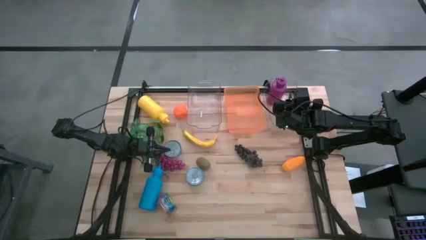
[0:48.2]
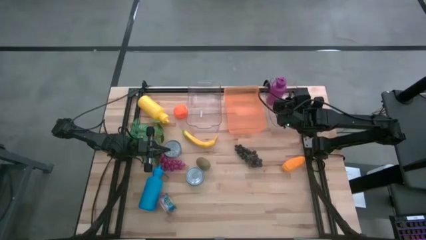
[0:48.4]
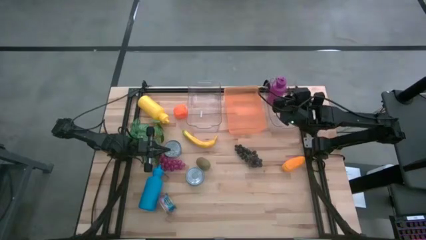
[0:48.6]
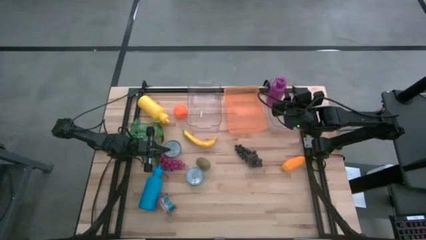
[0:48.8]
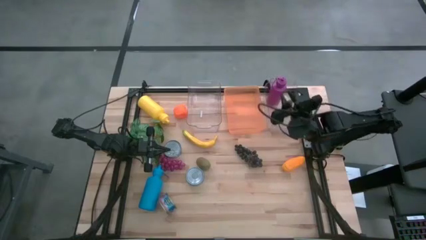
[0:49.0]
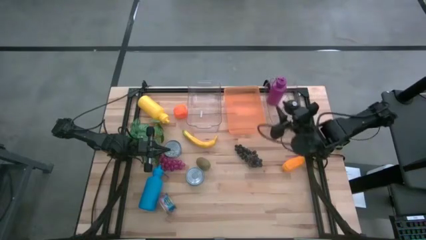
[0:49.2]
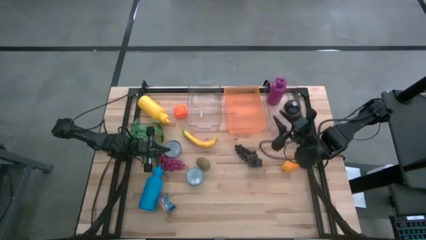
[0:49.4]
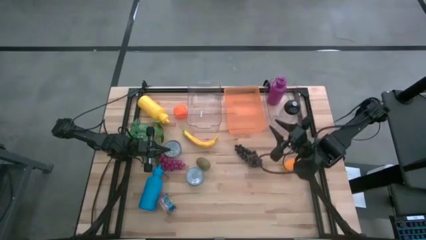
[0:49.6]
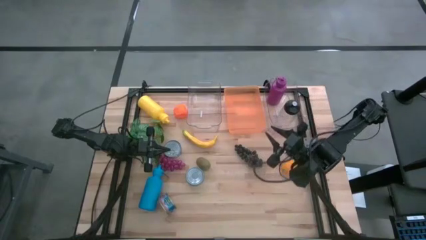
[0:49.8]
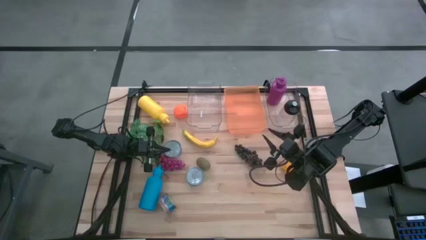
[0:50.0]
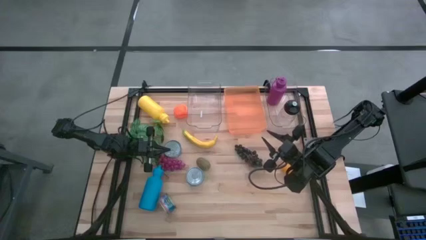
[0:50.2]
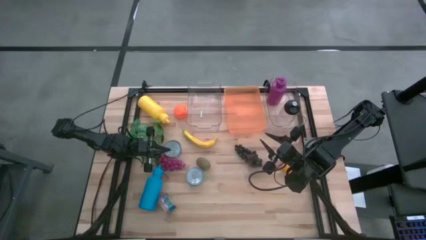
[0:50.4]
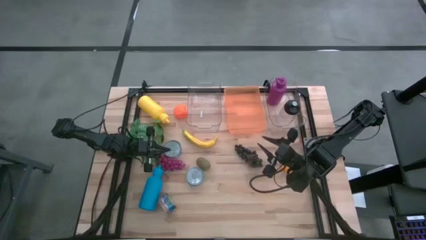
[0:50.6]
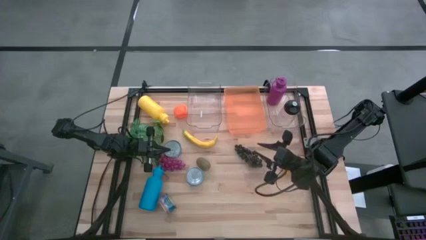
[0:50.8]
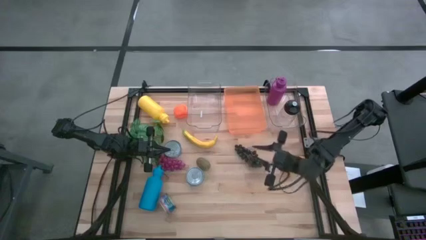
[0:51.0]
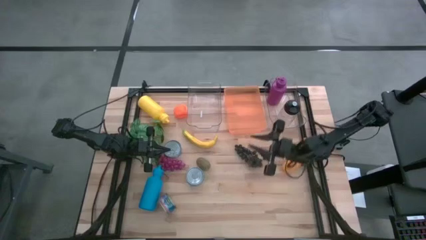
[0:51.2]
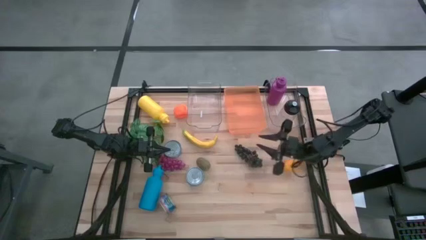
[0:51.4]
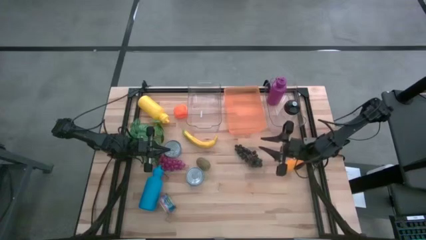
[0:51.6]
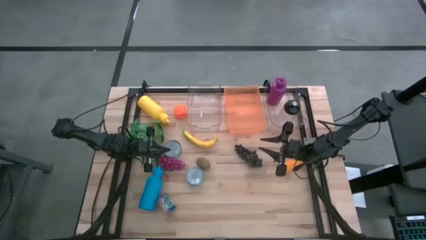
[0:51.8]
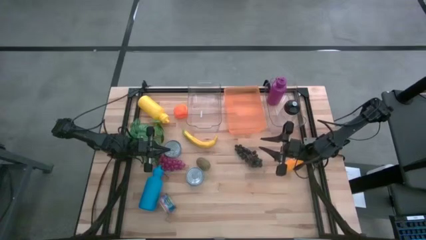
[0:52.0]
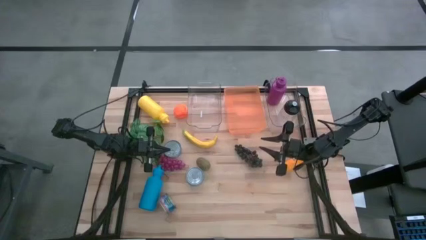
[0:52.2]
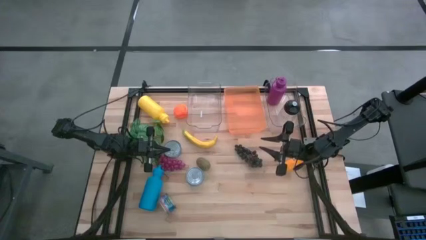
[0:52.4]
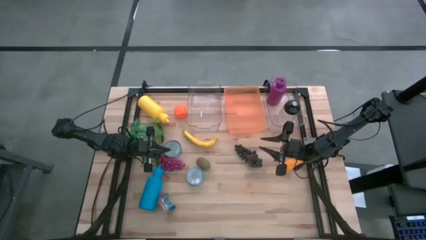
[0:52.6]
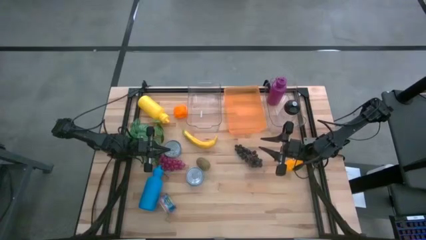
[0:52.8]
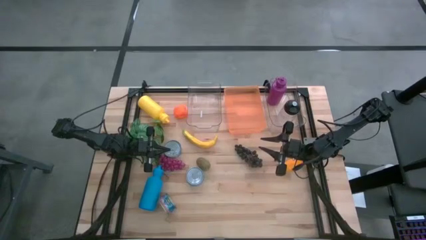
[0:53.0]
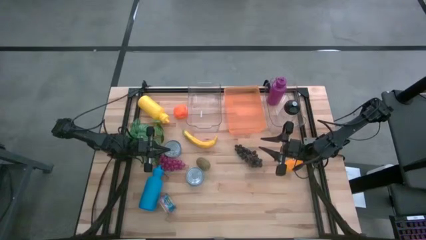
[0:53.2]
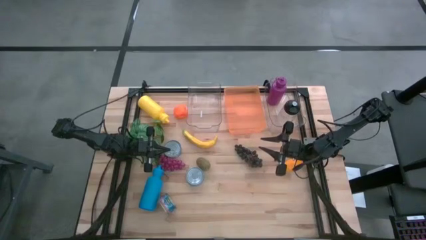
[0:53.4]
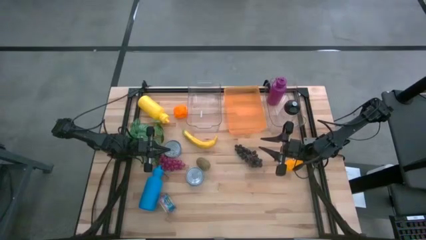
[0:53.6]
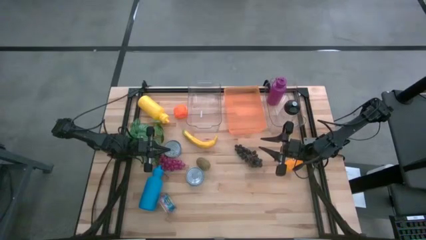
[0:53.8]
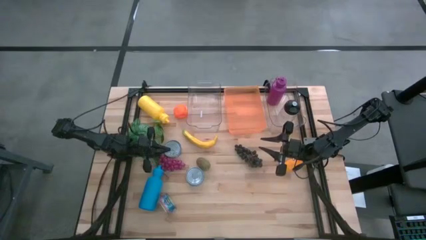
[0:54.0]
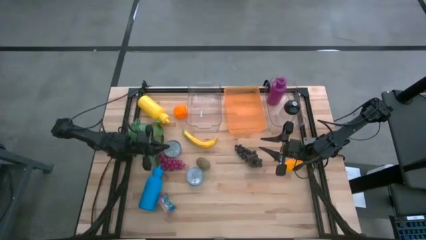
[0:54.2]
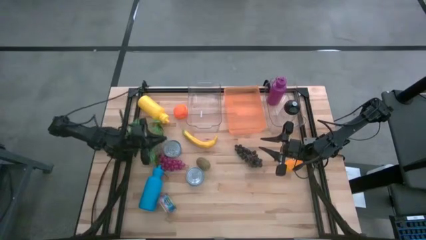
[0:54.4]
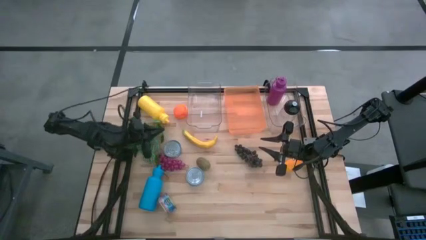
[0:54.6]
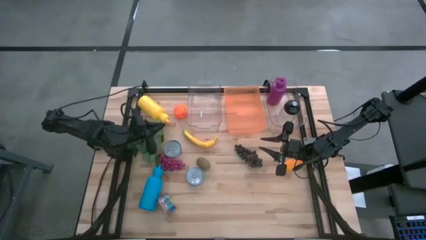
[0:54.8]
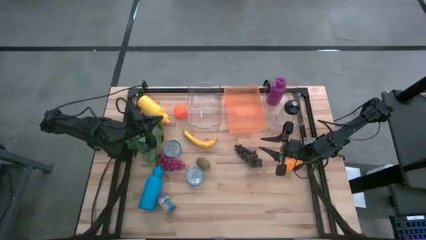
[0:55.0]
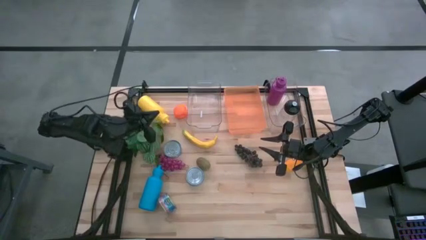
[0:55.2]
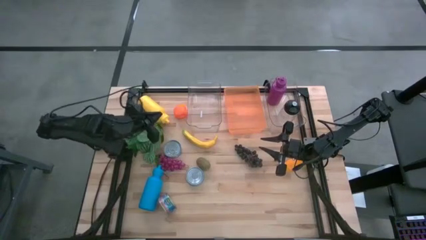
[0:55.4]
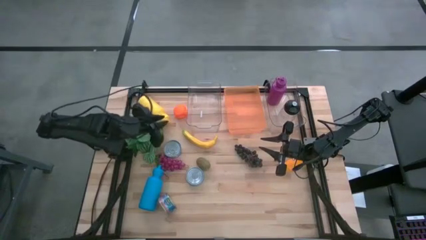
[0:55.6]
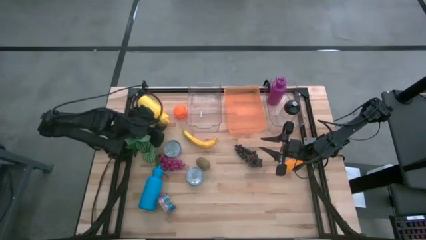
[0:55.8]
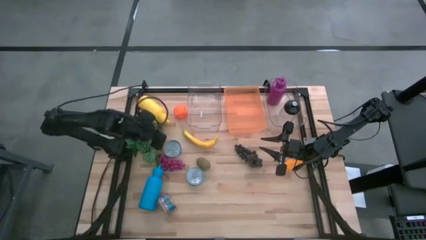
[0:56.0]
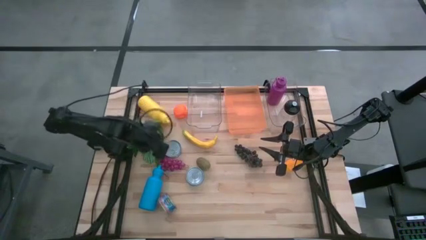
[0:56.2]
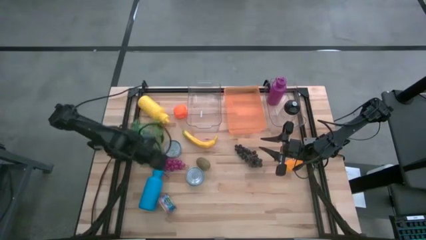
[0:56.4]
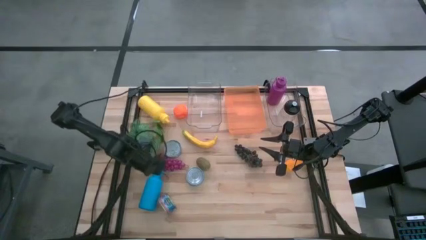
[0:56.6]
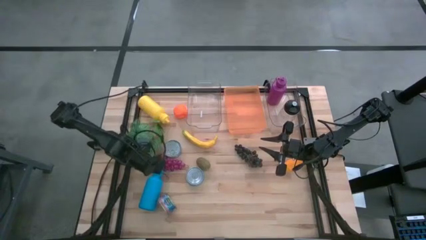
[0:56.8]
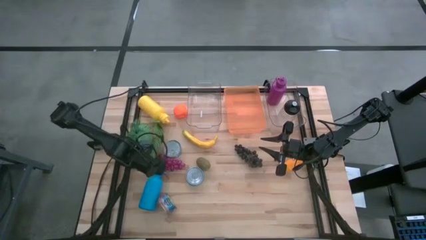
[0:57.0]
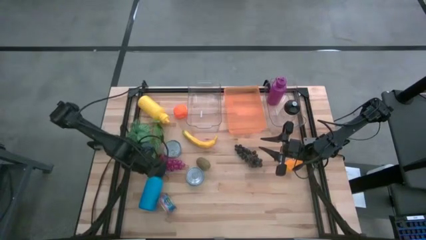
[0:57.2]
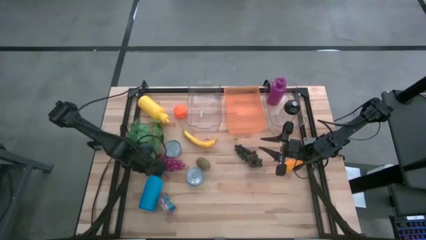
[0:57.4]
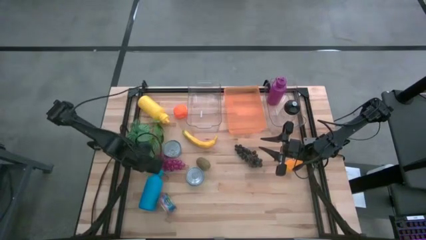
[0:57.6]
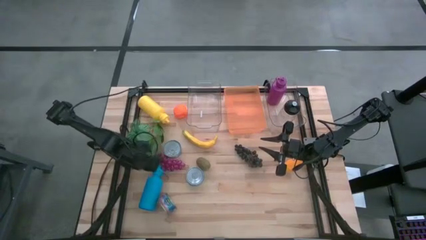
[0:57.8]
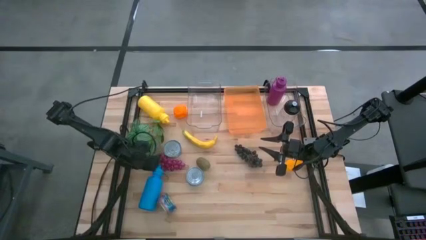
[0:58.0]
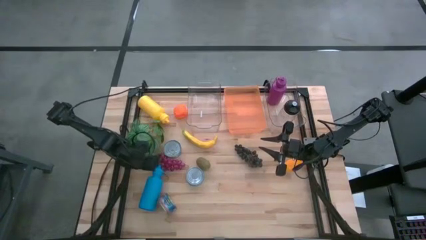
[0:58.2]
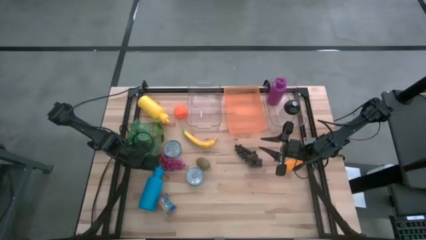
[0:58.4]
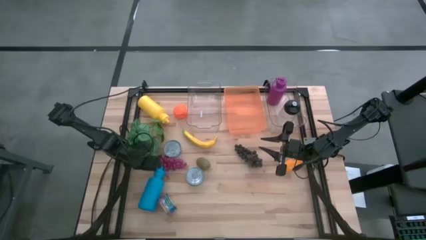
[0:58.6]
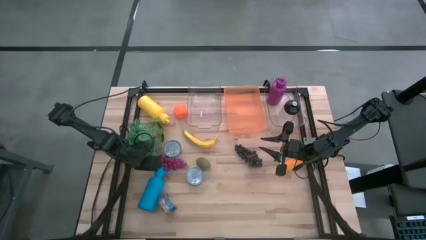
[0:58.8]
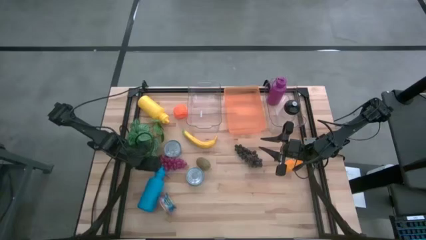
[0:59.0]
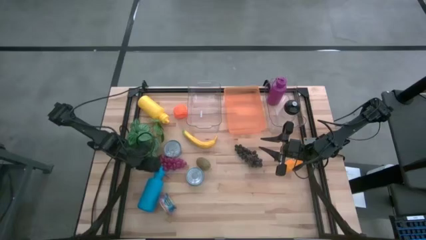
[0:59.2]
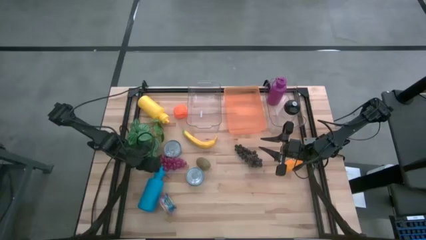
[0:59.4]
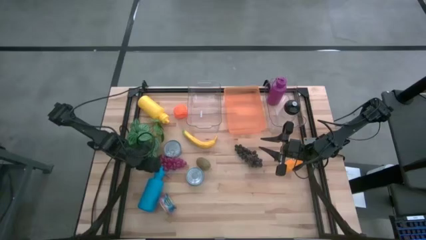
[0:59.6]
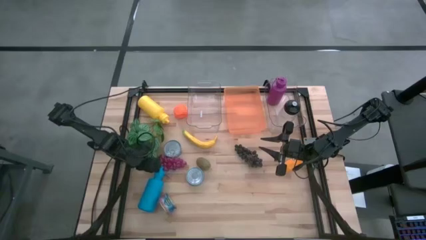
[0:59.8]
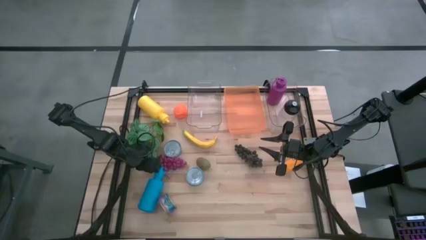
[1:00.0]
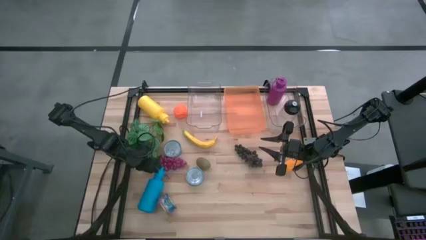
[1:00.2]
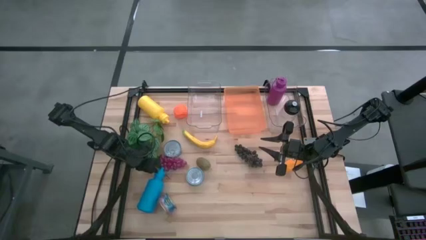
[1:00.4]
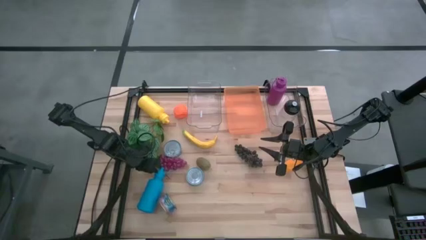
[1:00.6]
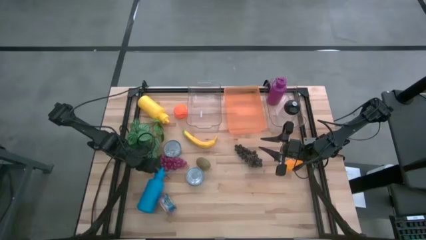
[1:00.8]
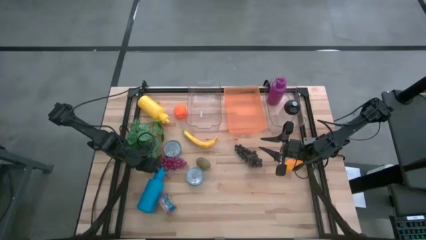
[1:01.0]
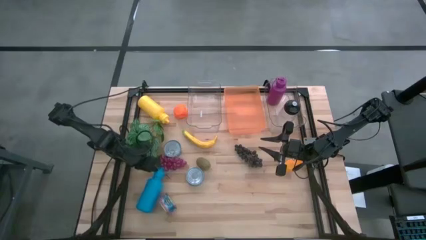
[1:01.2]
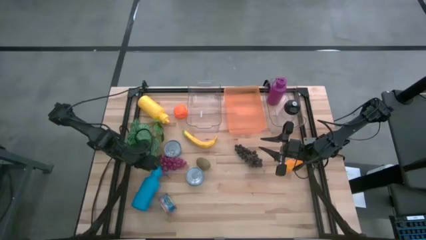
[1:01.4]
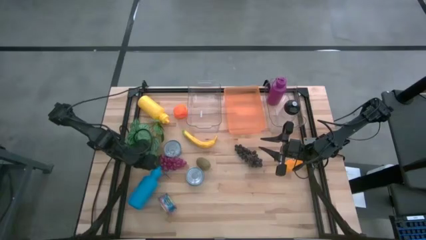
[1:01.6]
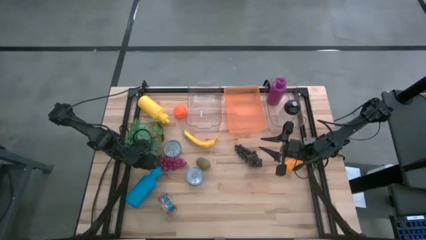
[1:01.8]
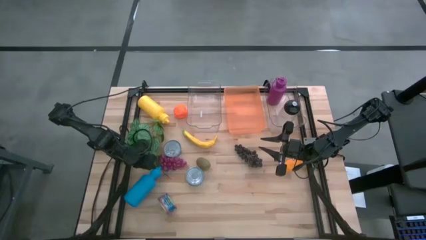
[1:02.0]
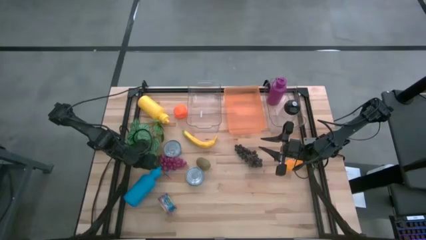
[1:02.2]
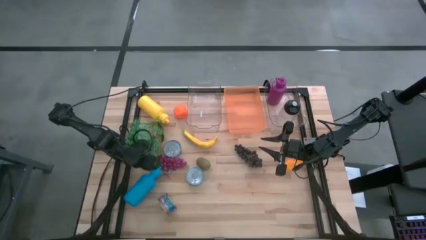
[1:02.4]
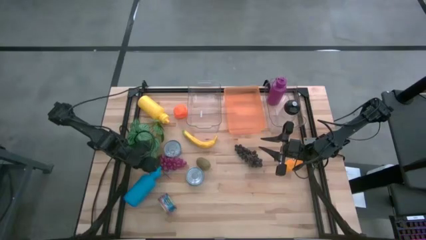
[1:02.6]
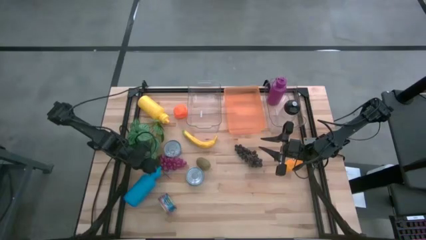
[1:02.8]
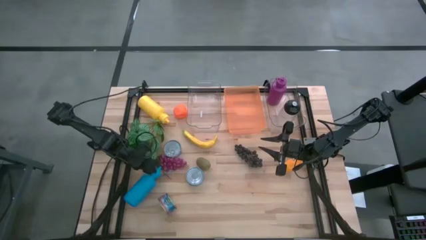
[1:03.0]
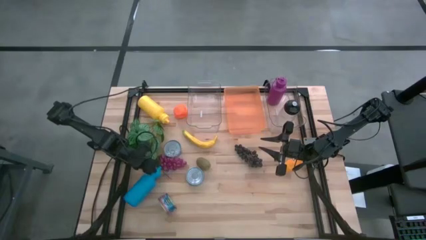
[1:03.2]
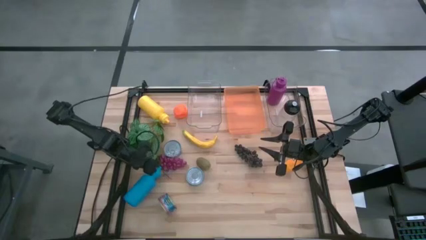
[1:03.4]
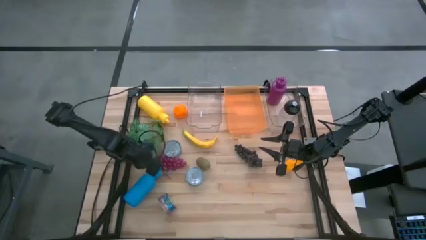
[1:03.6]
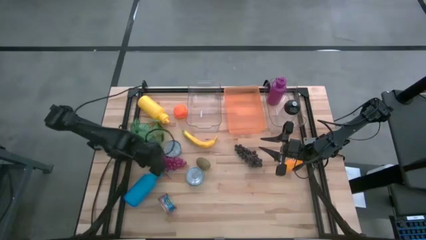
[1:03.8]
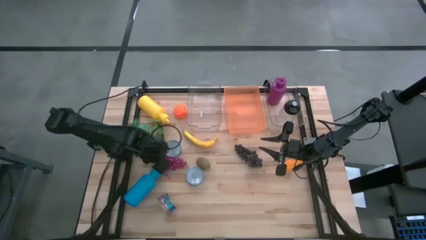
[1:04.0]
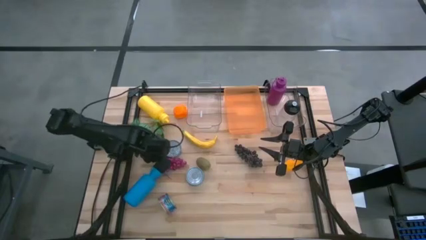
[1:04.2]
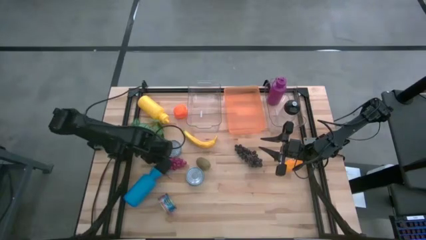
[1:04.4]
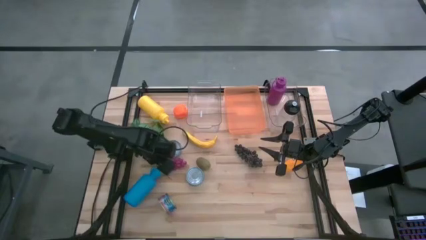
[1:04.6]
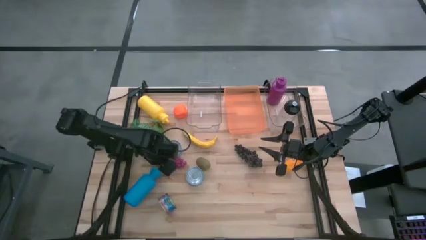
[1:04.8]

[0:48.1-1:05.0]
Task: Pick & Place Food Item
Put the blue water bottle into the right transparent bin
